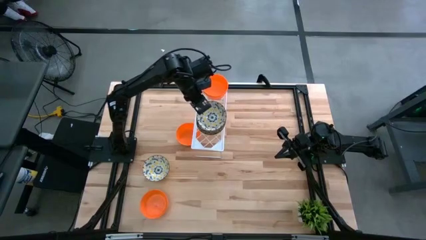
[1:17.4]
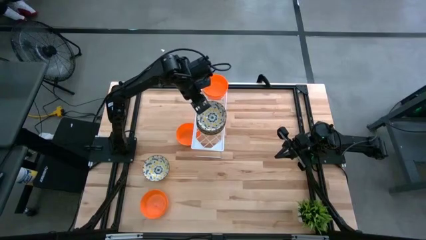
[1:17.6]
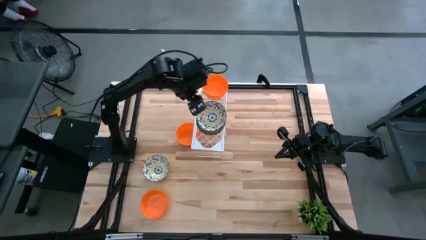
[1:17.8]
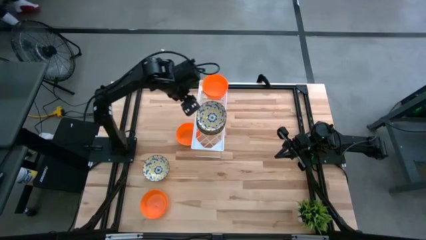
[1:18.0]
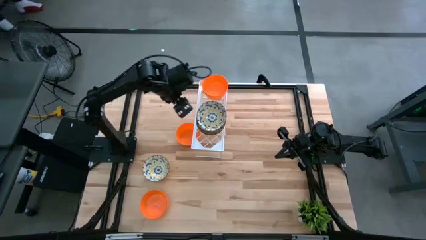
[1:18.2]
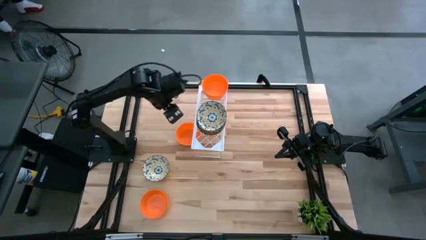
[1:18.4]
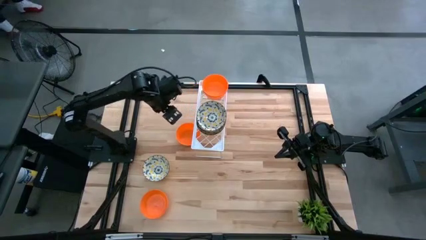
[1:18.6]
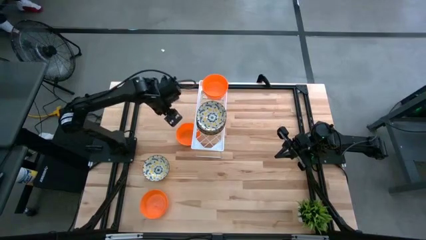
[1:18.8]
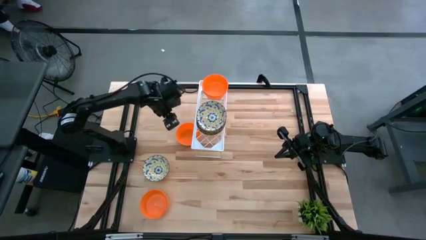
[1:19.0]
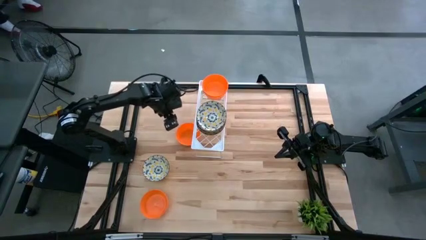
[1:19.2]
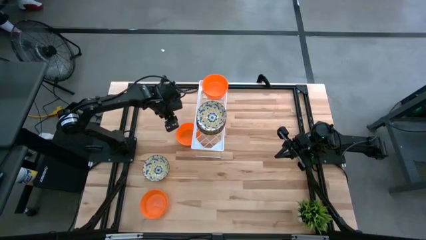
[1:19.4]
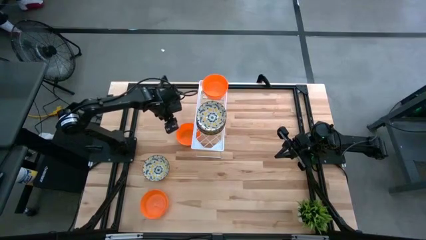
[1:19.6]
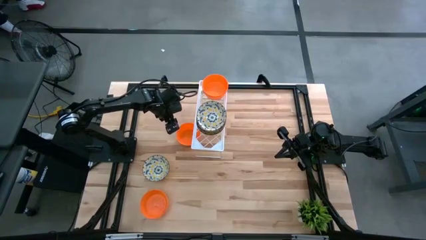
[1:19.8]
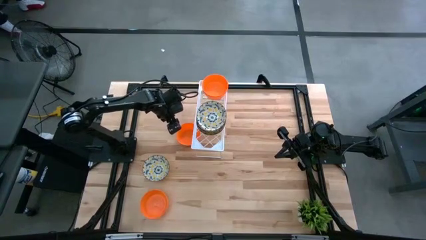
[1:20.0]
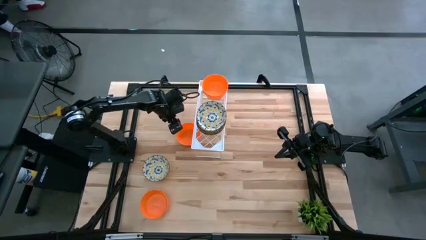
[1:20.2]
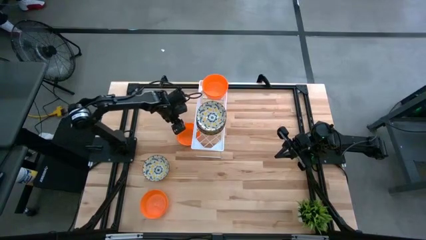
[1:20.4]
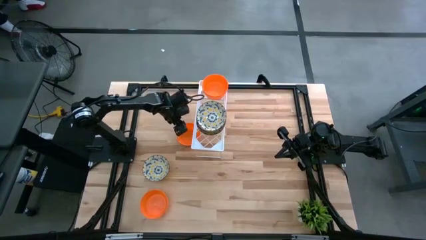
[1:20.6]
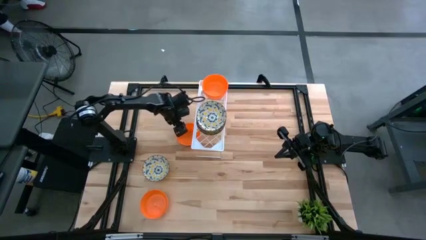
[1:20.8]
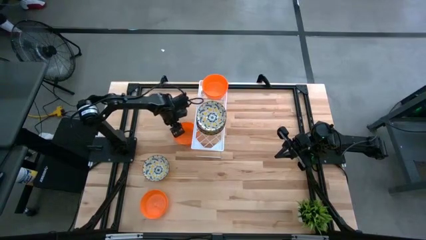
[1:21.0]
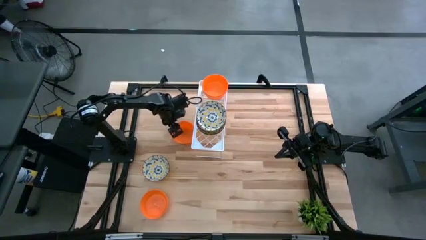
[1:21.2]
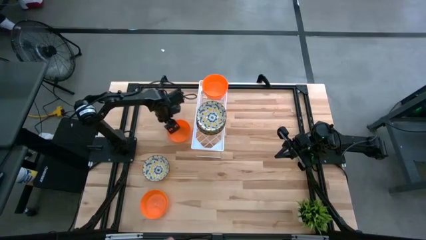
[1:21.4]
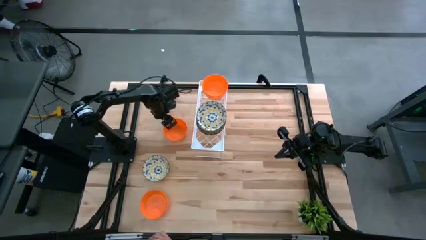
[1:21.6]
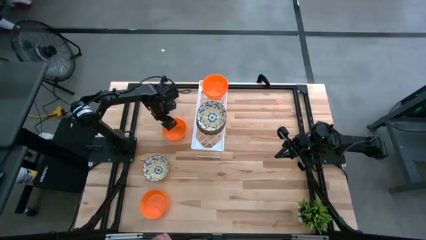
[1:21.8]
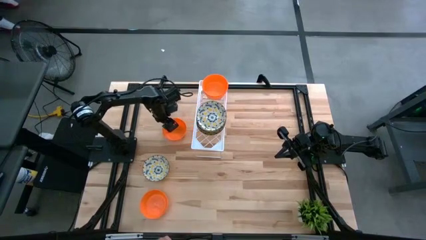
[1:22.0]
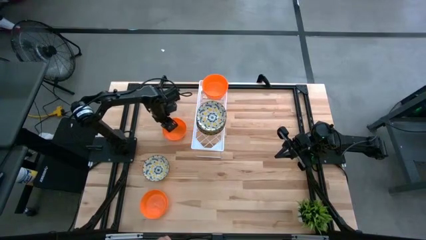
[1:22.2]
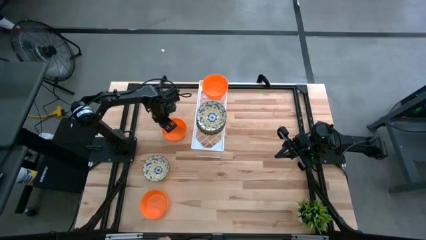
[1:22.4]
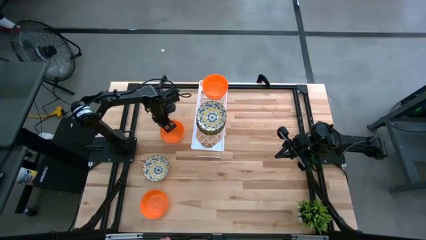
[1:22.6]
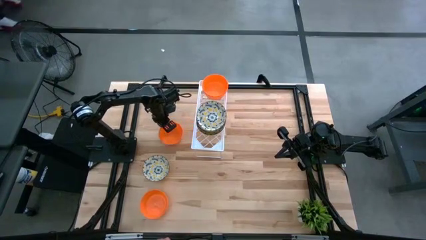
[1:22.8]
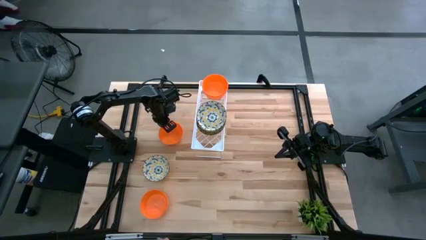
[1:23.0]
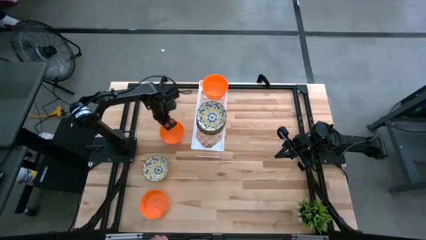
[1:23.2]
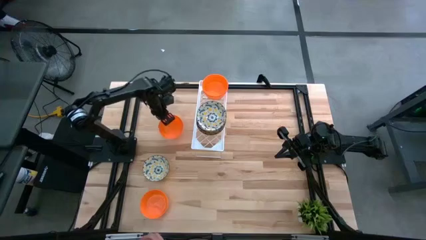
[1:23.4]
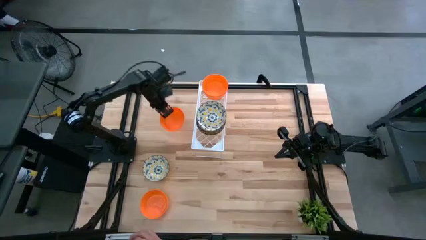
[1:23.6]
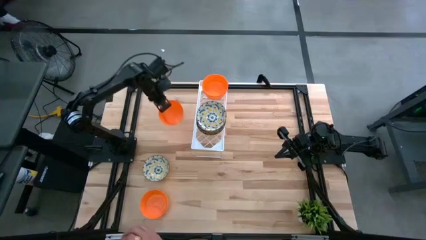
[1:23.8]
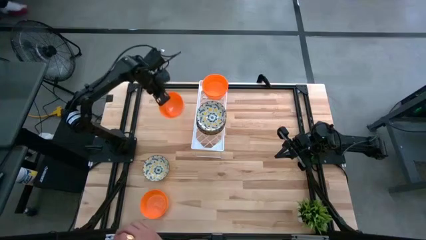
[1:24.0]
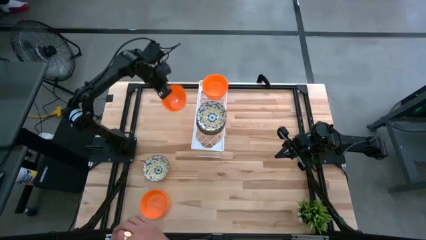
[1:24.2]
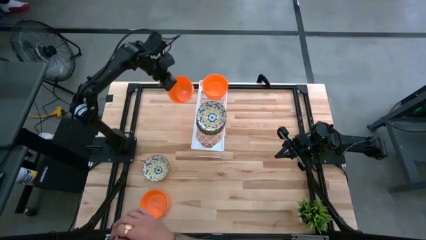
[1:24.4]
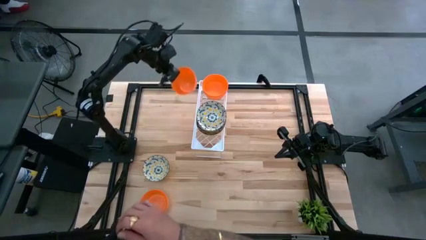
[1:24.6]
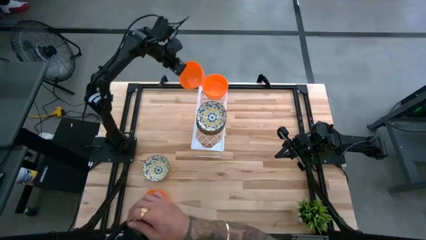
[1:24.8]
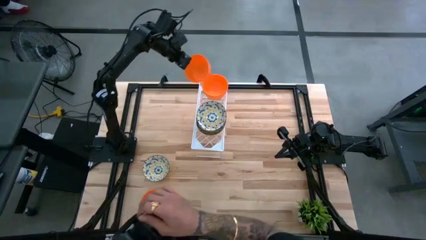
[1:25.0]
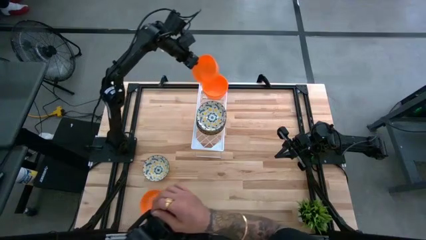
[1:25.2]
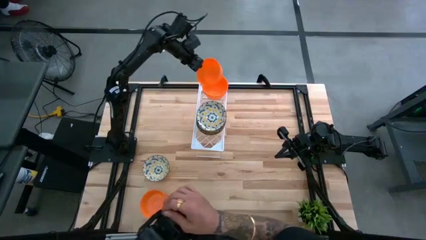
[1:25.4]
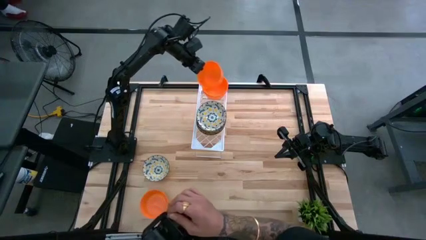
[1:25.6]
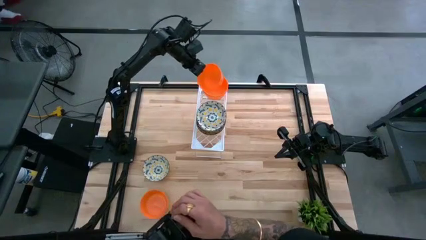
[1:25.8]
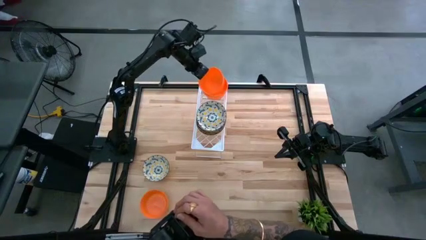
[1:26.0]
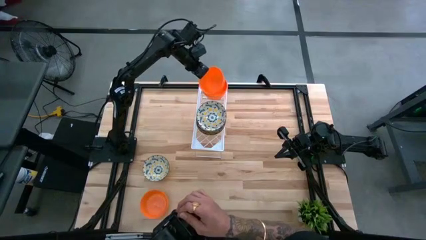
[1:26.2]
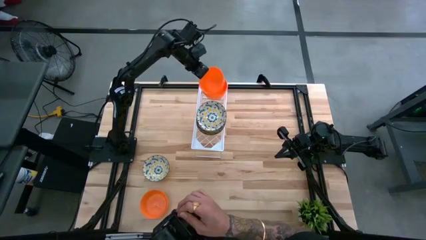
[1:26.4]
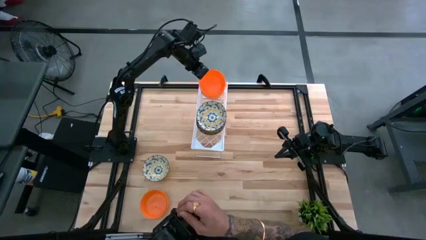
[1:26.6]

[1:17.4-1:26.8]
Task: Pick & Place Mini bowls
Stack the orange bowl on the stacked orange bowls on the shelf

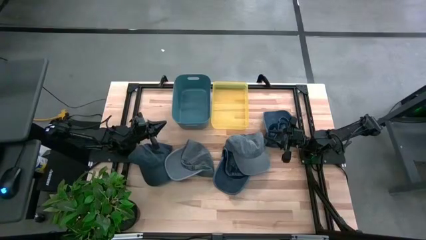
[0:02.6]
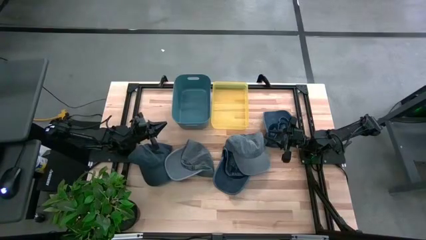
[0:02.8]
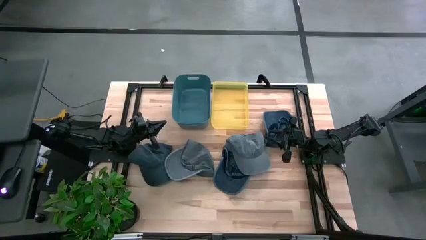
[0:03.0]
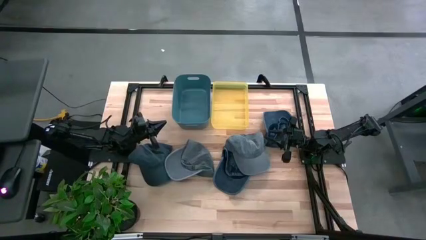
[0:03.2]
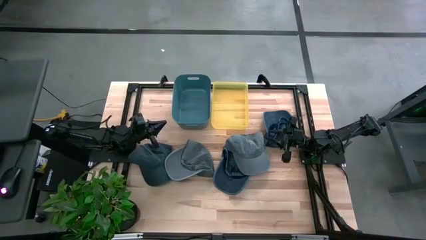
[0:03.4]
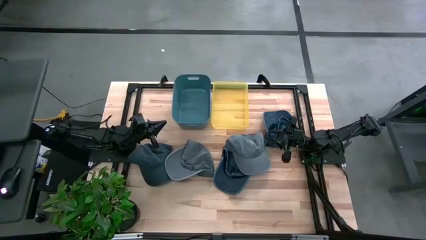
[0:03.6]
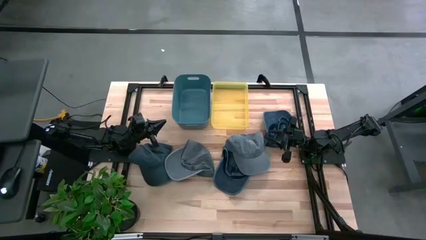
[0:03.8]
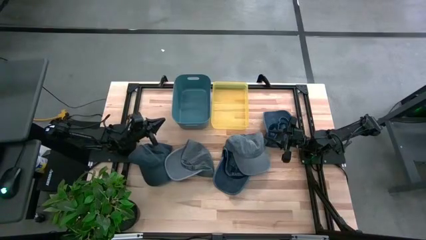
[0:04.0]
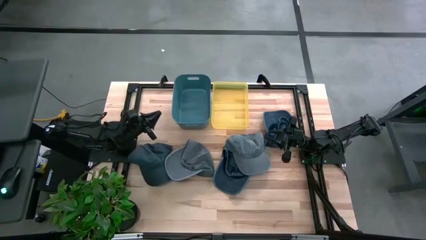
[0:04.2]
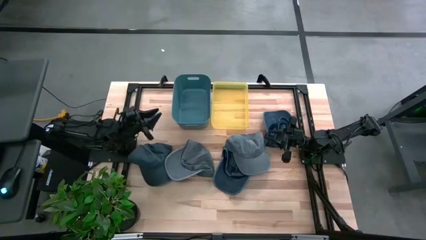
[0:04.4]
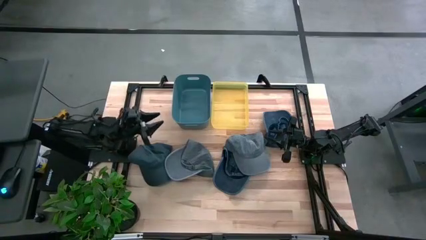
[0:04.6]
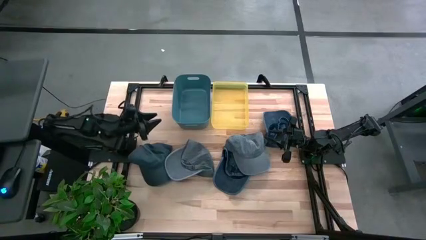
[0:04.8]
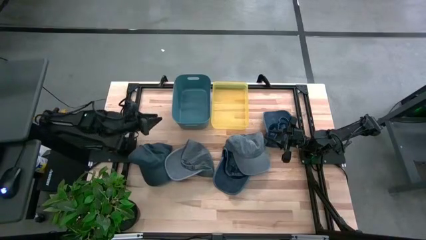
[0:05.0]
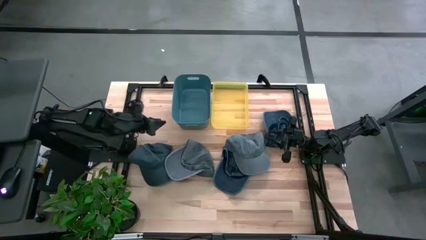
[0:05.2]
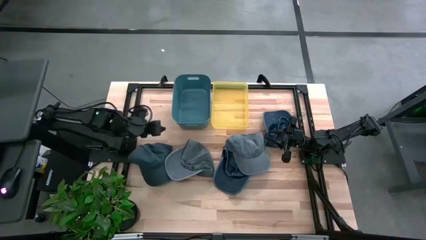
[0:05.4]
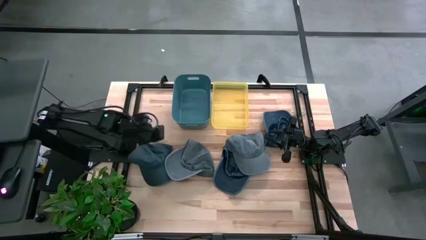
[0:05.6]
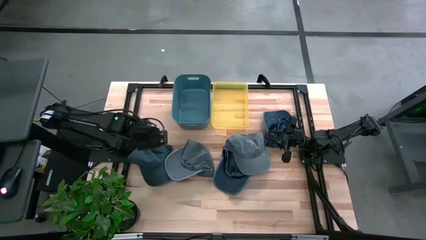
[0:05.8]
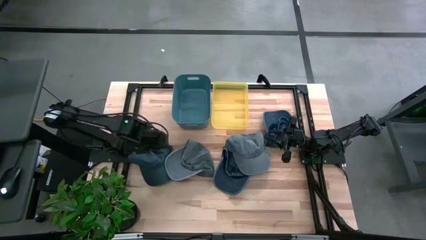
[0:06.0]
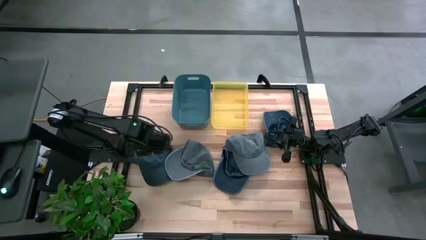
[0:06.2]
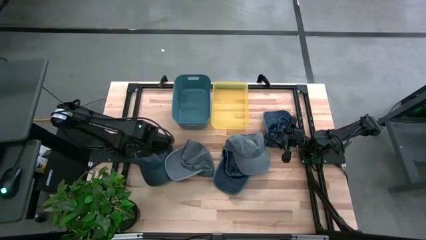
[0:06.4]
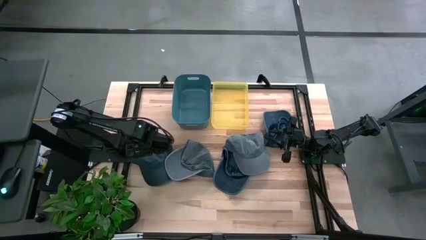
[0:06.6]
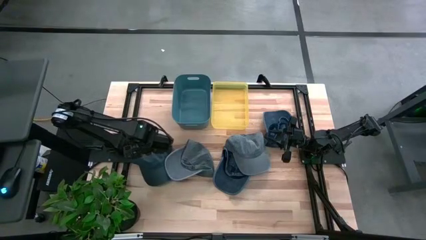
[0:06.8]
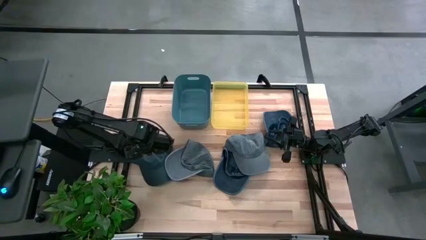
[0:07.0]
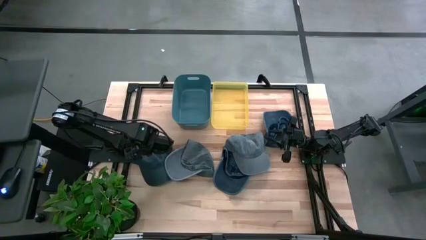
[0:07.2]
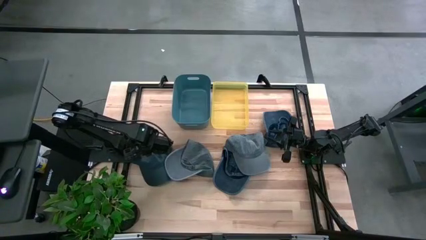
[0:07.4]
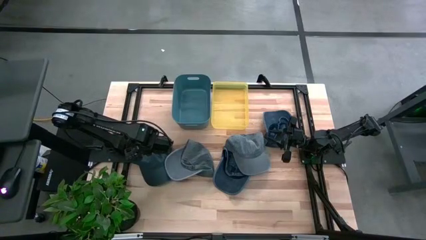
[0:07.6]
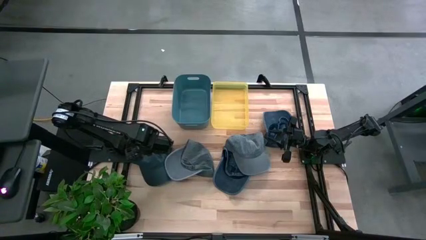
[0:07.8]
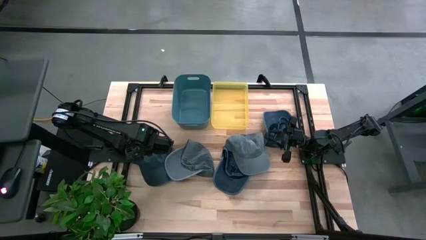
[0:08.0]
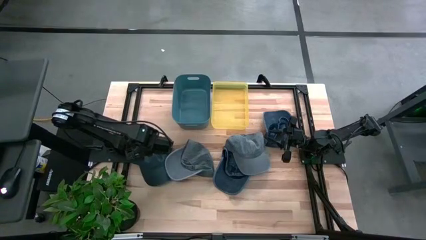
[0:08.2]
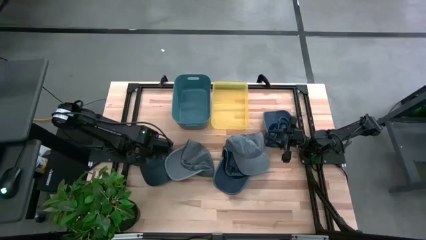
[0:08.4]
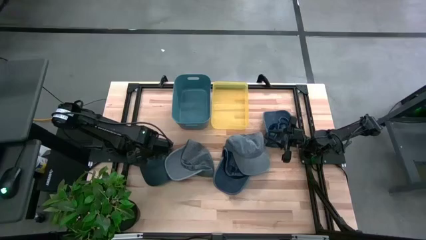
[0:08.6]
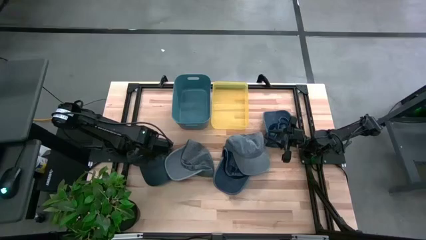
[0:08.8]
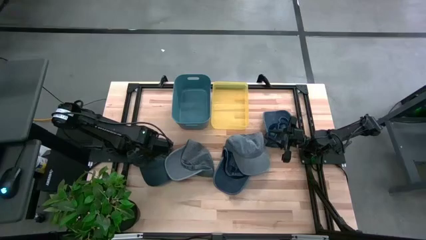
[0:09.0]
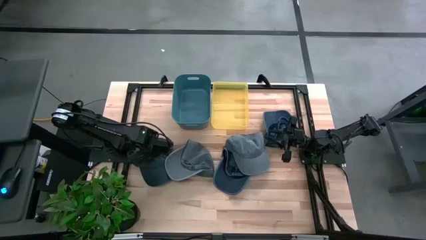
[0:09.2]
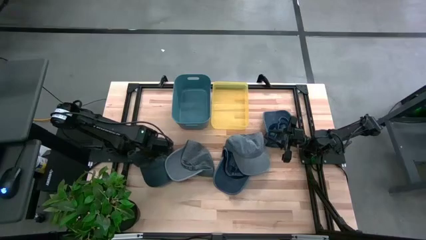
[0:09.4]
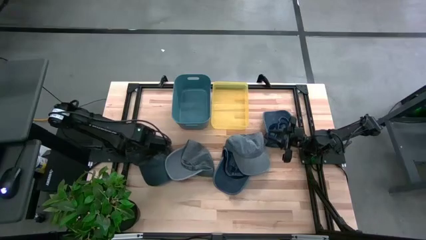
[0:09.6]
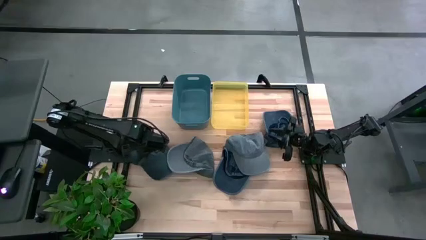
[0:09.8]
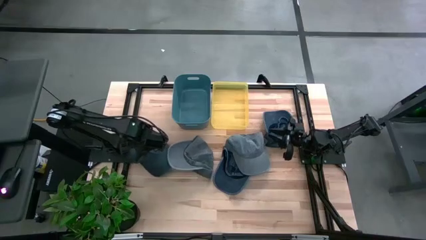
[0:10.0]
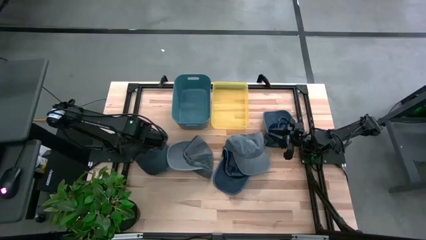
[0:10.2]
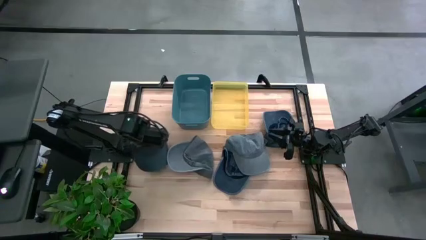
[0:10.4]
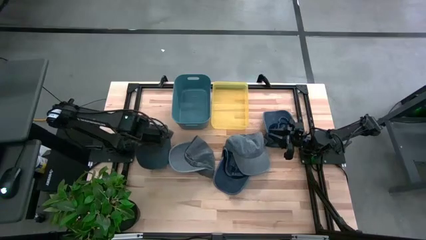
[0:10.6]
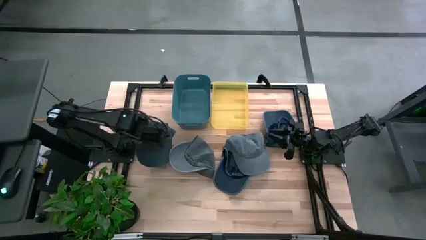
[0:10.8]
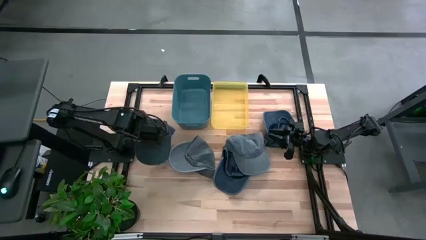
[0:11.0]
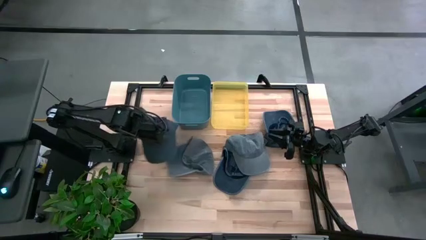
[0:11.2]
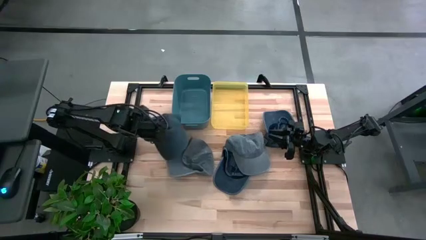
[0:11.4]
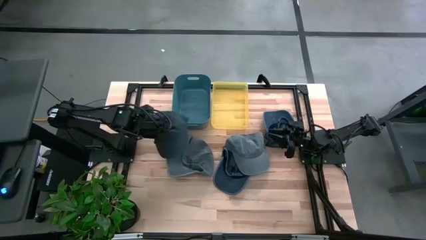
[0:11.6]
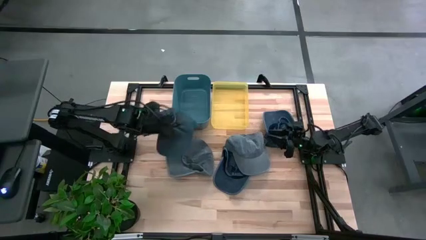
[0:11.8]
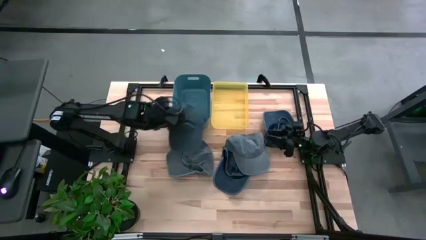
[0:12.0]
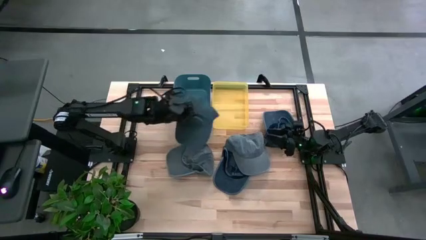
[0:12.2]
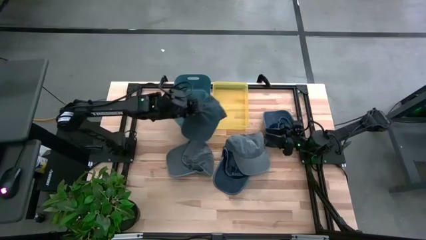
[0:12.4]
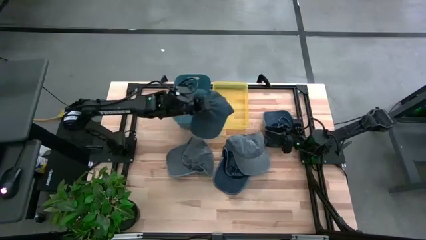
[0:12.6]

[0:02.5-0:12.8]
Task: Pick & Place hat
Put the left blue cap into the yellow bin
